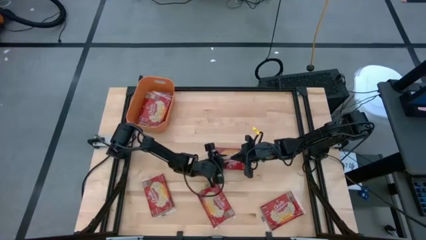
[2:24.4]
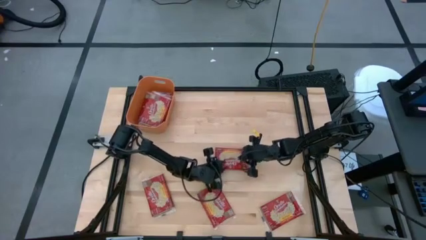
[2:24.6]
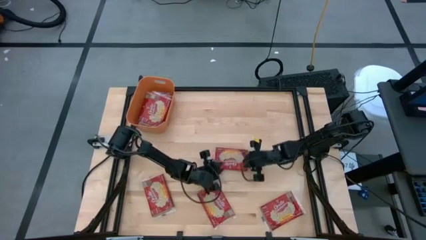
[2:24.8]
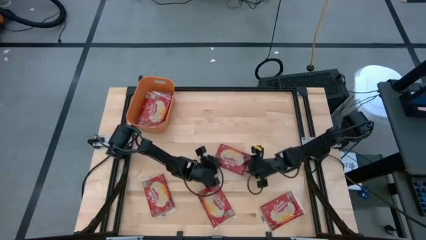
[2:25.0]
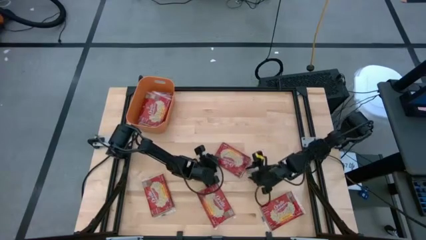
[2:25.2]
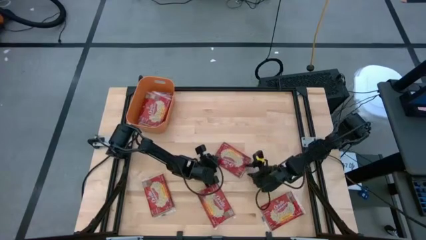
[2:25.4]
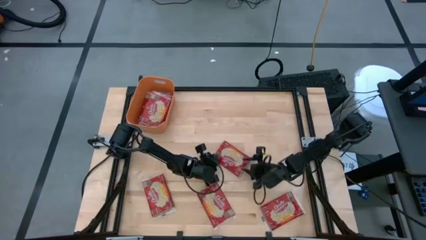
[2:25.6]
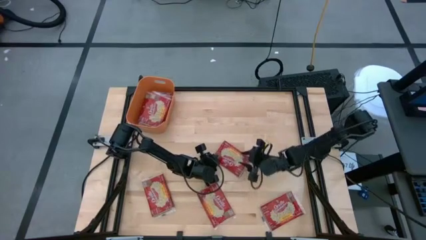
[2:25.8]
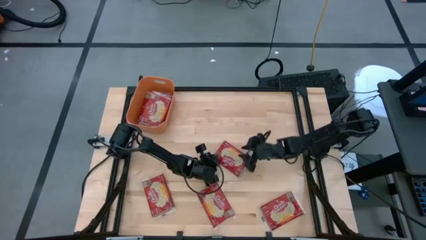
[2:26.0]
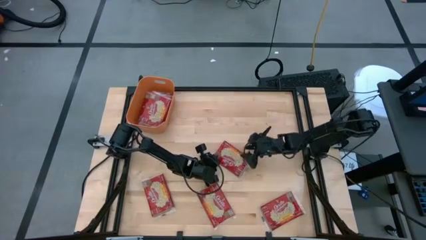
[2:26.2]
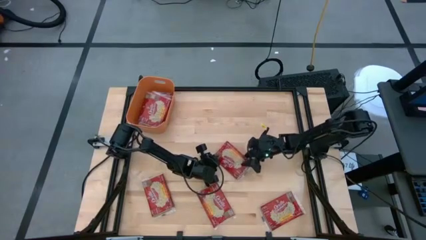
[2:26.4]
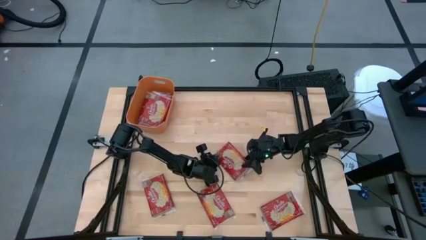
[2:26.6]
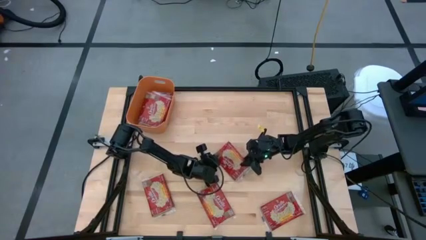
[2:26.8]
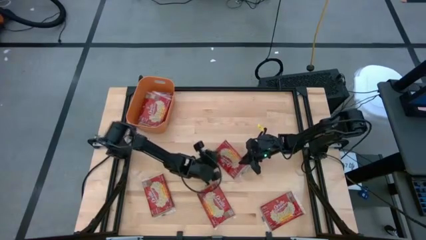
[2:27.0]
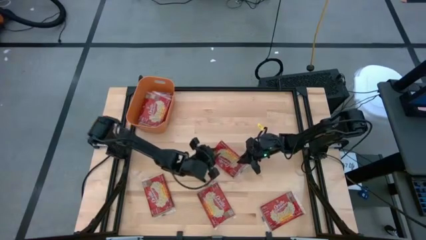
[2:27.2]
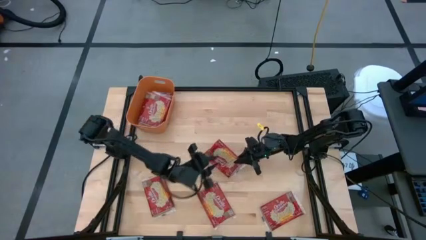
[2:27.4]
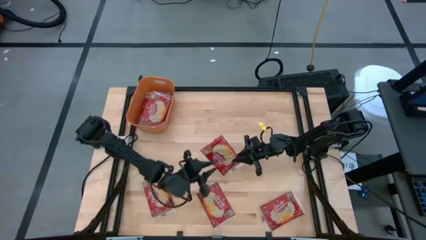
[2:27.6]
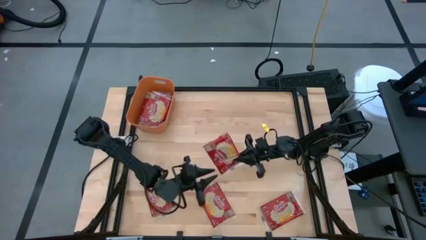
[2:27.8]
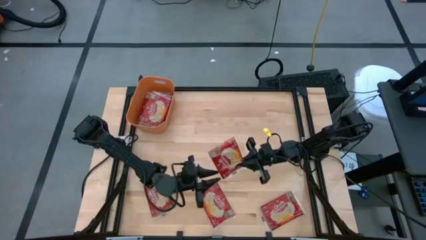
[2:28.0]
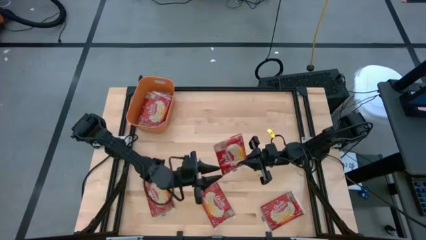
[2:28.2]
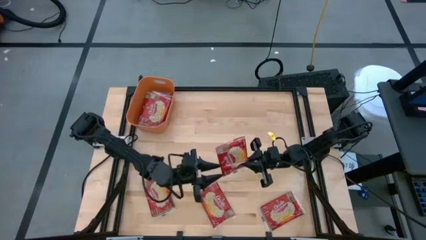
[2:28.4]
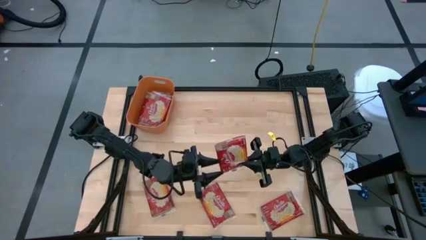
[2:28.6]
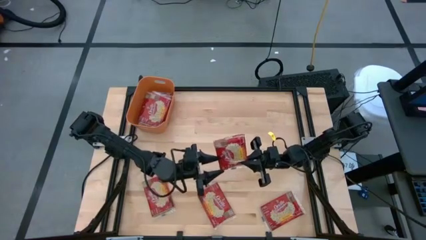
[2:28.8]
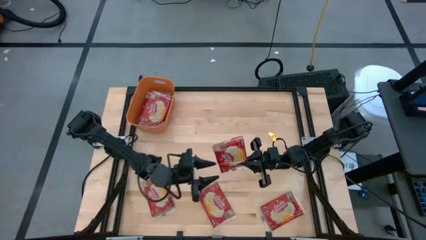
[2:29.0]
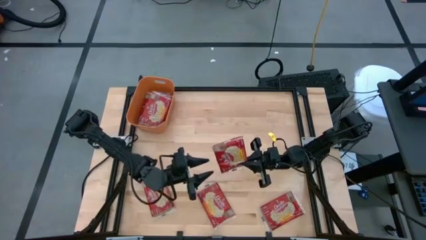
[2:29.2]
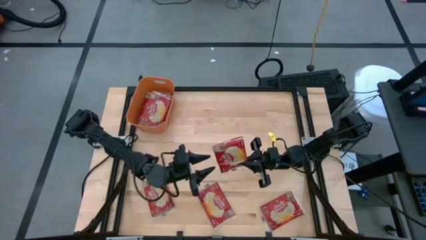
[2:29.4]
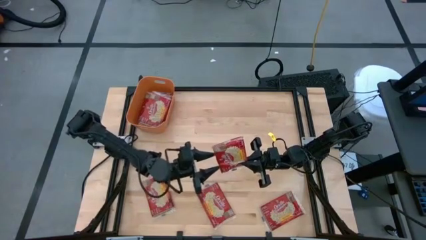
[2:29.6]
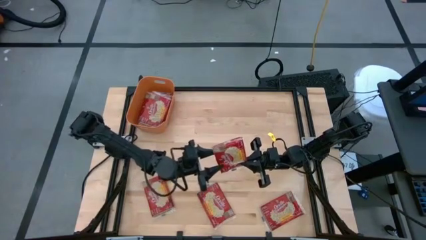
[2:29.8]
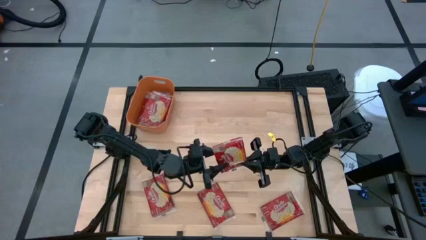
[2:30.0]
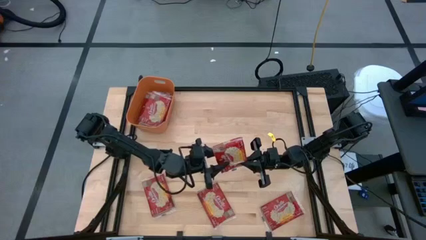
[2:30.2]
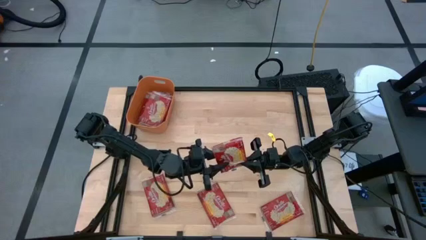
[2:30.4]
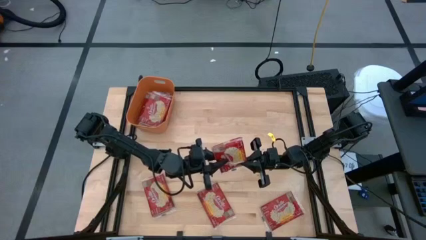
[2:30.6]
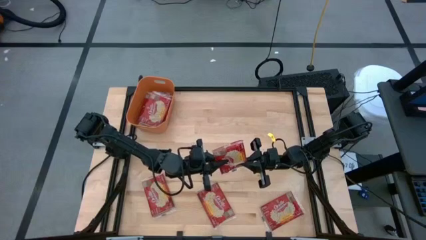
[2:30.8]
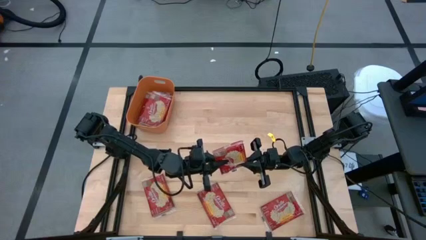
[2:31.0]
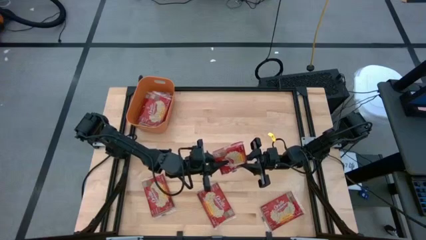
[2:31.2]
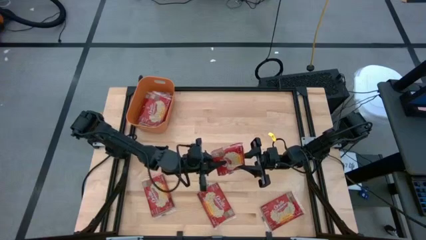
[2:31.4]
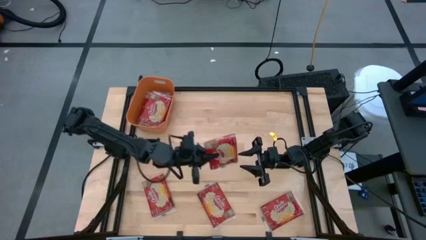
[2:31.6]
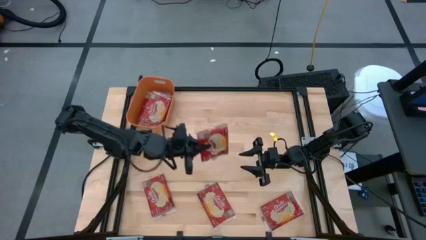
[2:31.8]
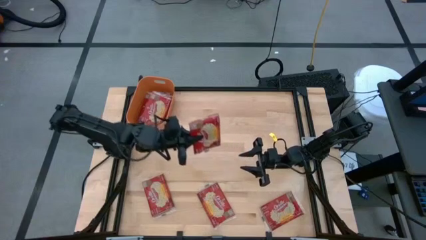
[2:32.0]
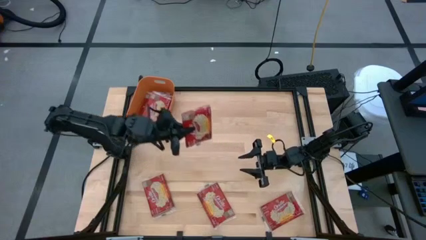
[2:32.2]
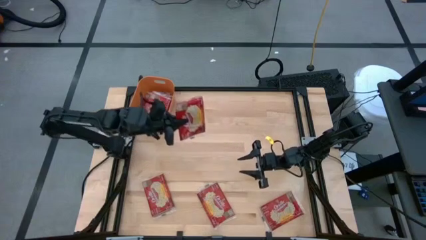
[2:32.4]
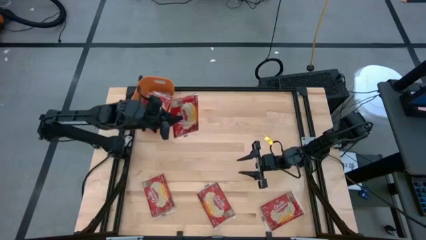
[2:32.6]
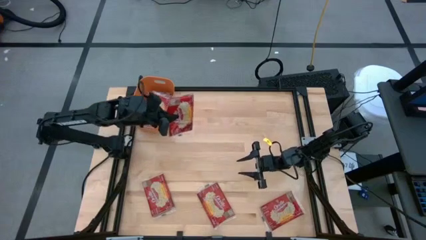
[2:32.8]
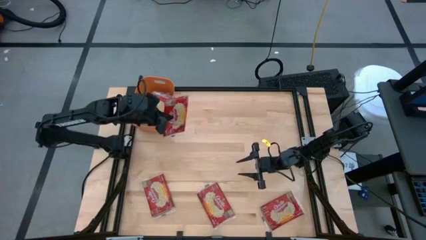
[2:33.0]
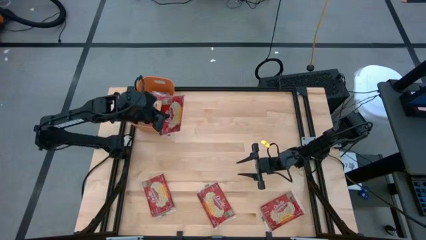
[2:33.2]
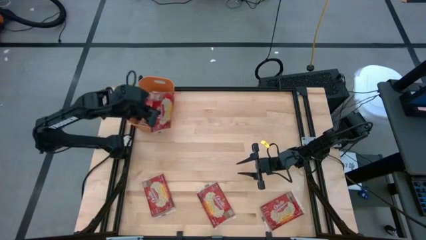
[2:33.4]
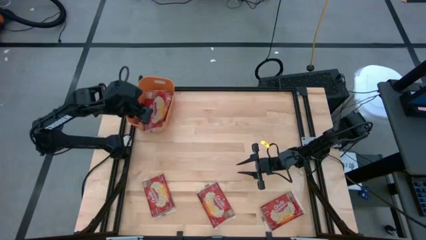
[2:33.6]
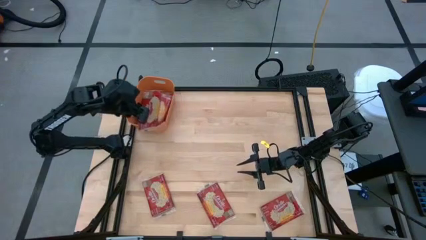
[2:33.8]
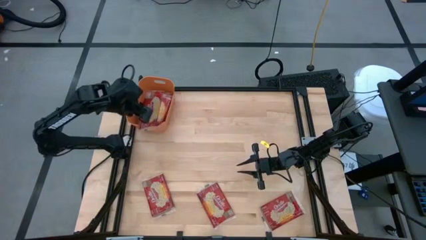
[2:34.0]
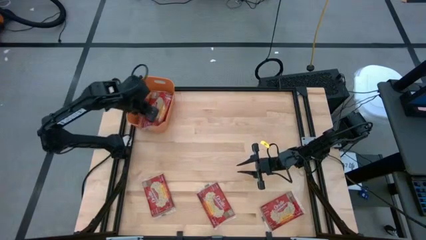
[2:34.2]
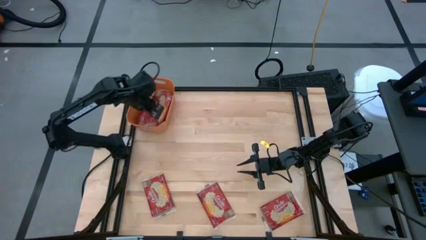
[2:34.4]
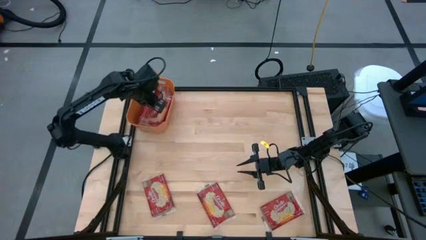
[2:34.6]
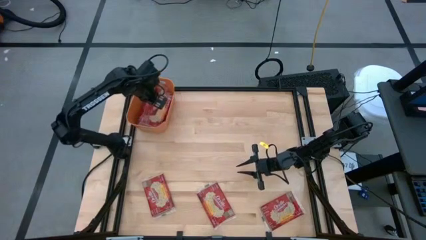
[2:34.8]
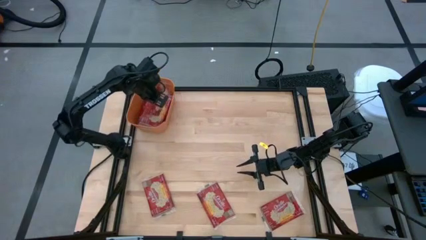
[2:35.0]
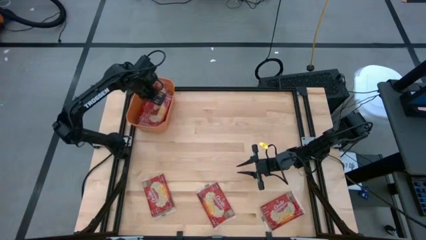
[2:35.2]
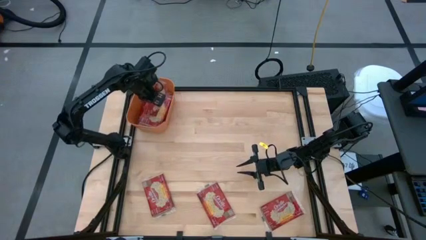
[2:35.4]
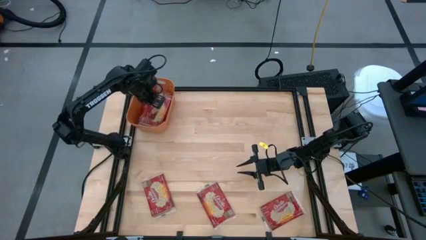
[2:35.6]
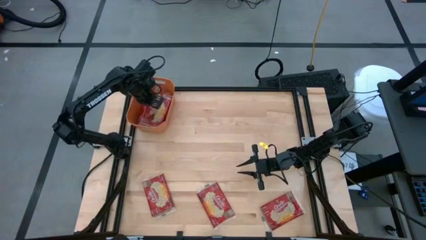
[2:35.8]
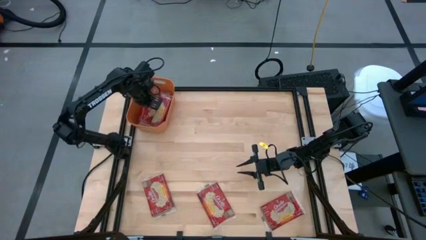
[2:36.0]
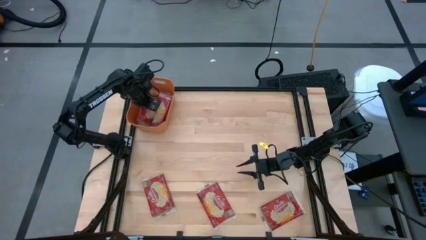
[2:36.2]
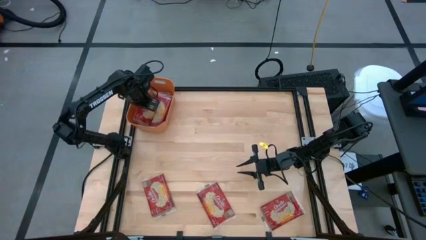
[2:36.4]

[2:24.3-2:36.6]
Task: Sort popcorn bags into baskets
Put the red popcorn bag into the orange bin

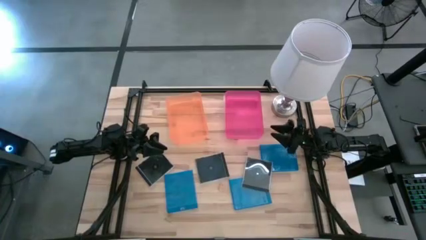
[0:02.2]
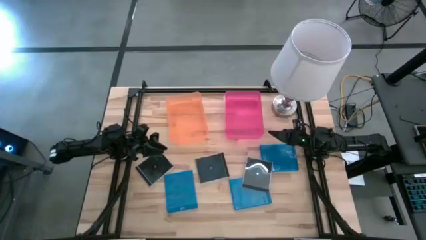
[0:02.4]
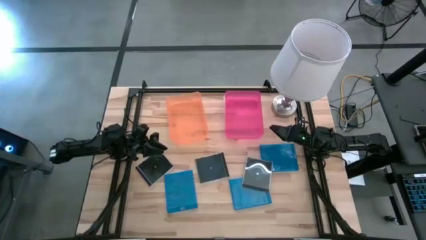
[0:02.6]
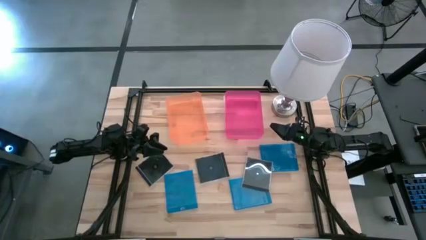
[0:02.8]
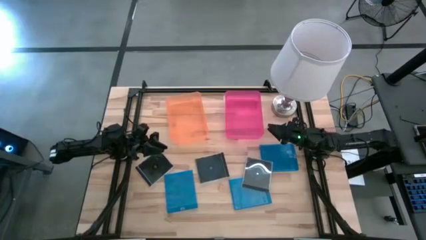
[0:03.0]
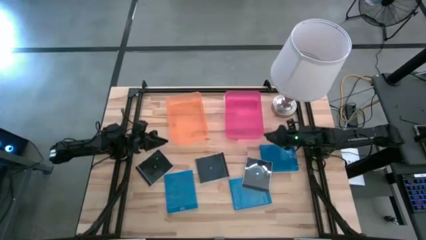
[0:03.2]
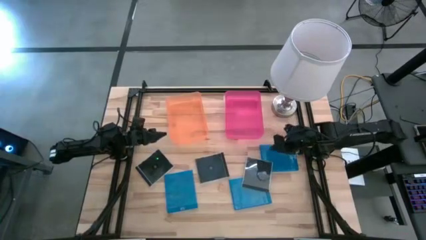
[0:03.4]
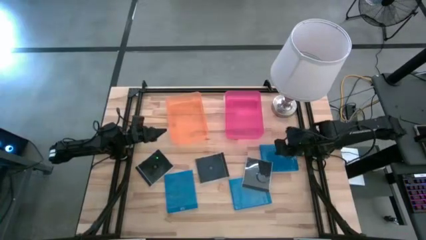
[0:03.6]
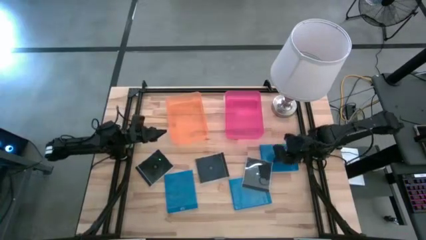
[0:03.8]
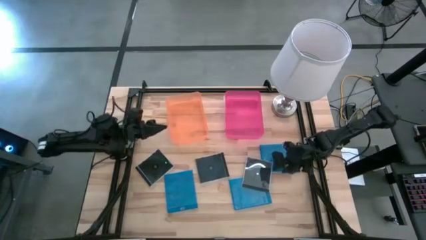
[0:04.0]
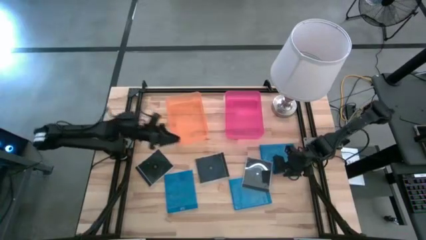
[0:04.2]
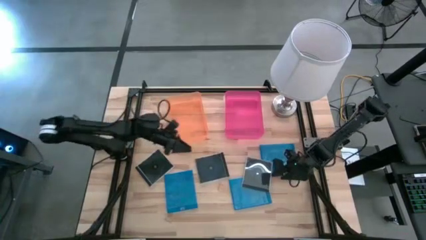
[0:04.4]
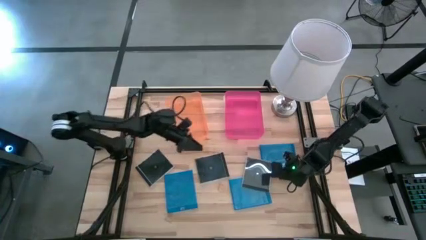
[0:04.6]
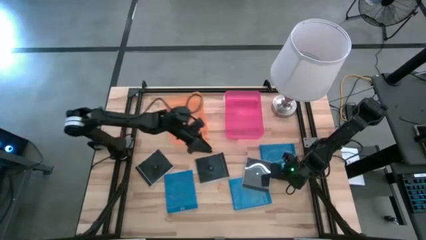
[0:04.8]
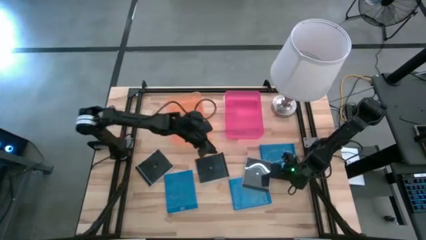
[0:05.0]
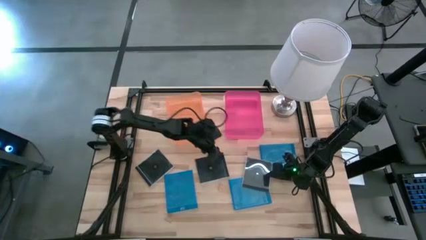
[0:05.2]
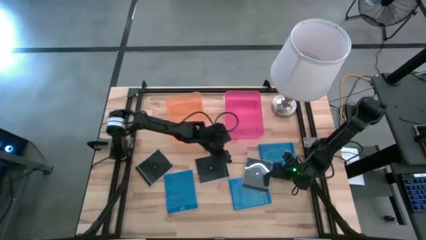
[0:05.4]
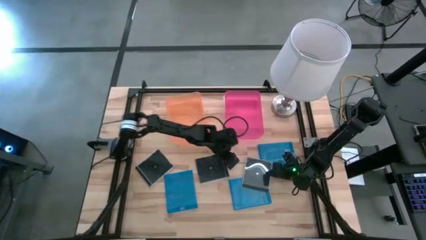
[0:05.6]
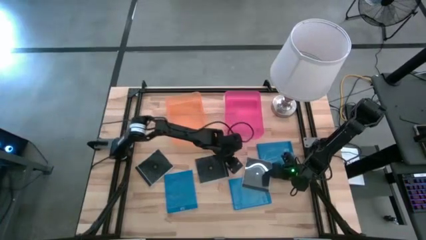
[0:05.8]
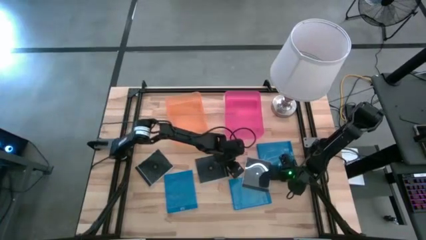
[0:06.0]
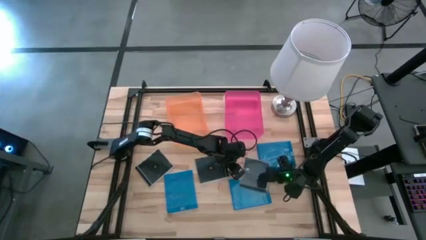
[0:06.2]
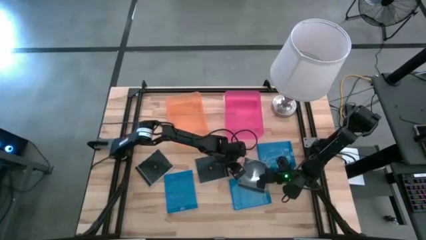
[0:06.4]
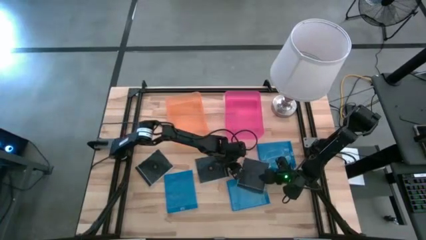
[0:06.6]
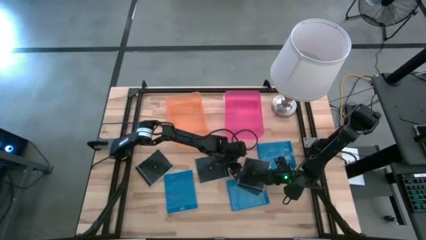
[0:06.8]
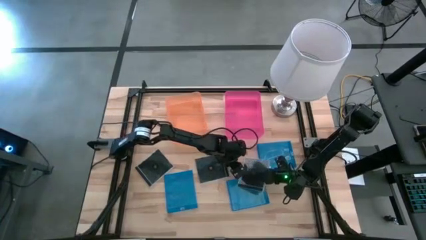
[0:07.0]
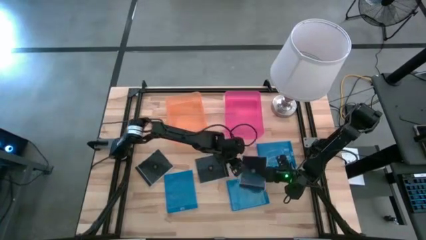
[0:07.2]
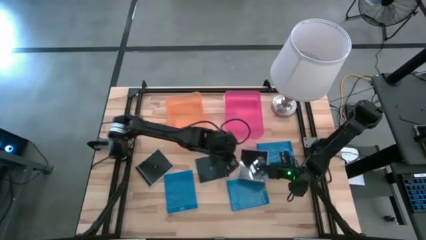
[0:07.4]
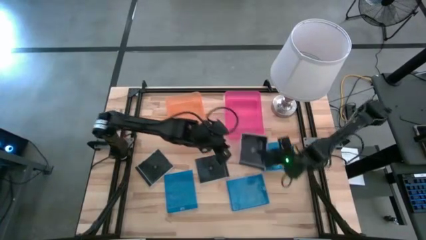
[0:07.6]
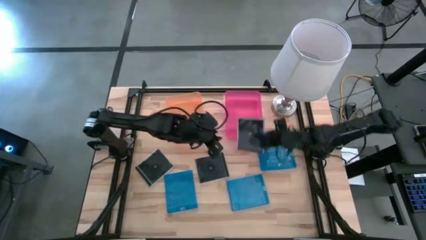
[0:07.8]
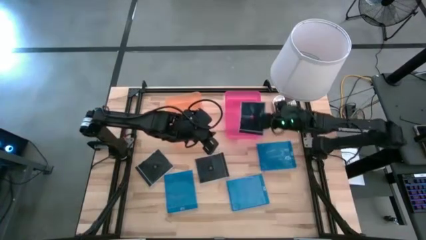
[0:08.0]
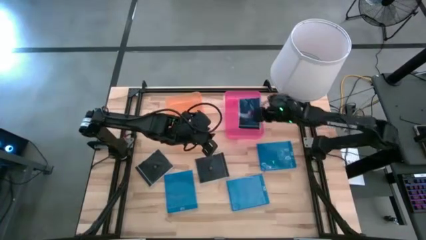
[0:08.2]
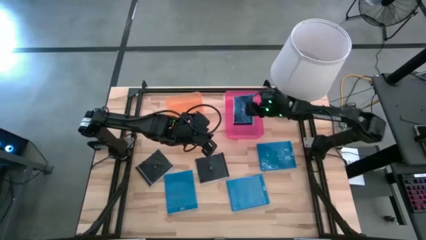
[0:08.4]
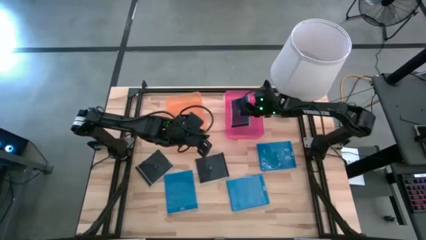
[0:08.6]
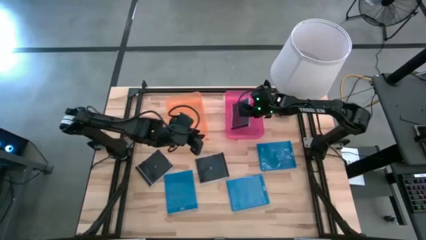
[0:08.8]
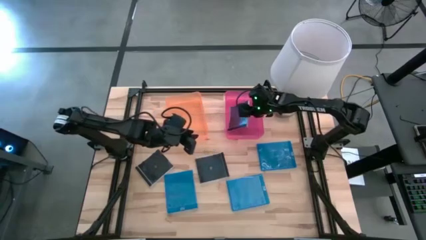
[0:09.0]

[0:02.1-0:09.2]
Task: Pick & place jewel cases by type
Put the right black CD case into the pink bin
